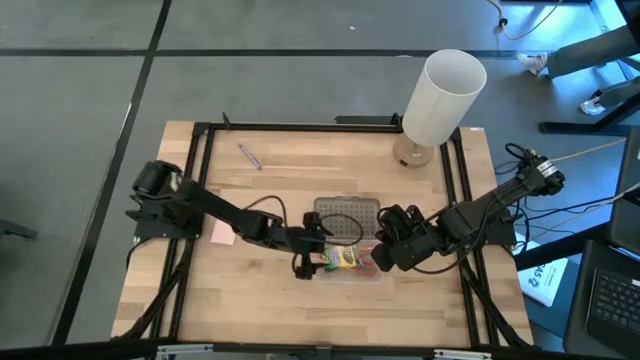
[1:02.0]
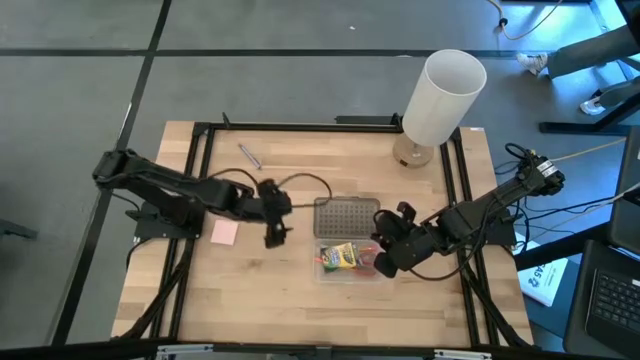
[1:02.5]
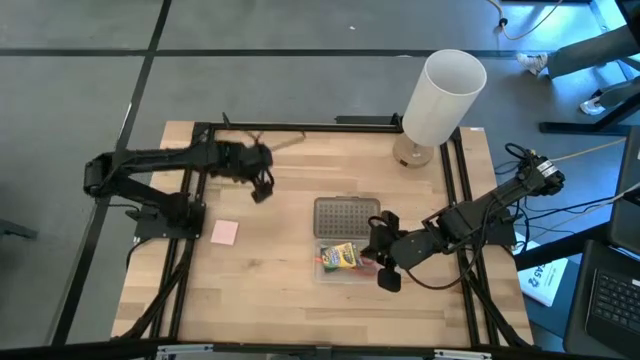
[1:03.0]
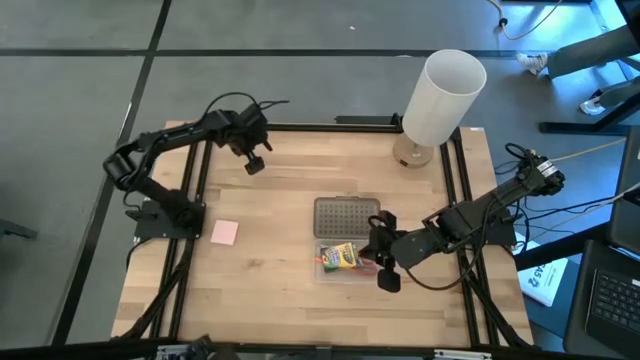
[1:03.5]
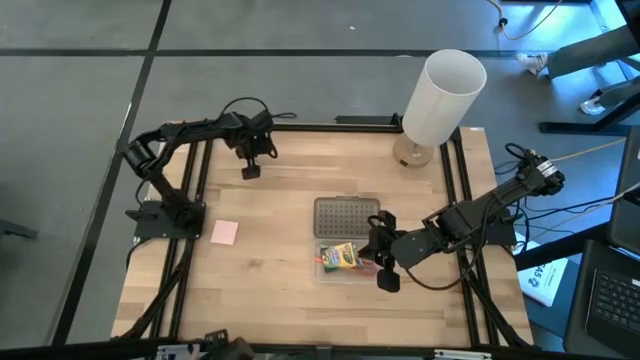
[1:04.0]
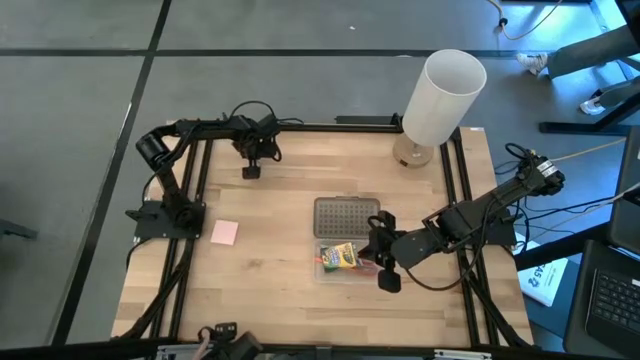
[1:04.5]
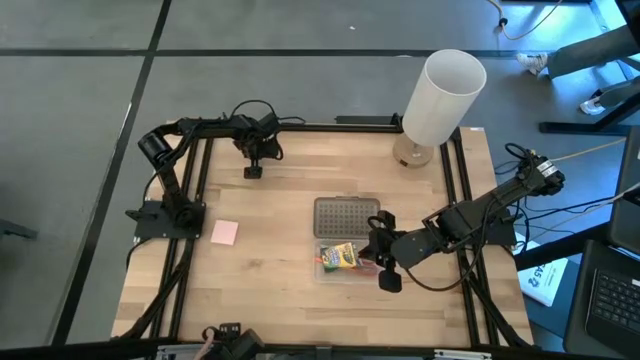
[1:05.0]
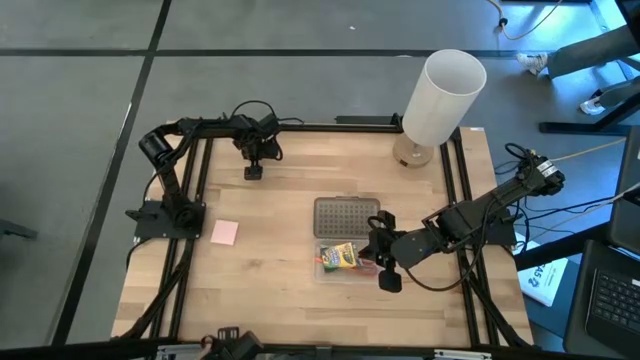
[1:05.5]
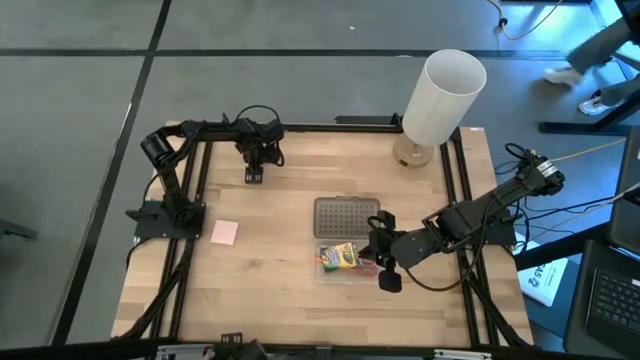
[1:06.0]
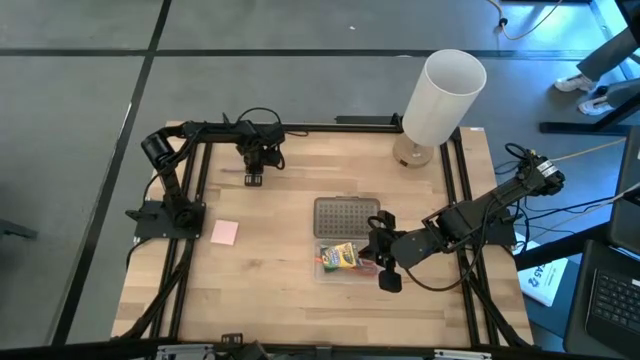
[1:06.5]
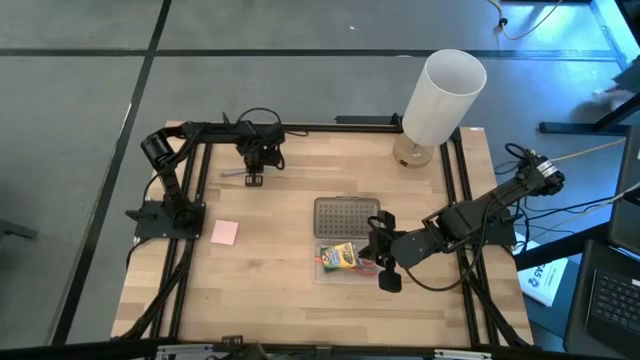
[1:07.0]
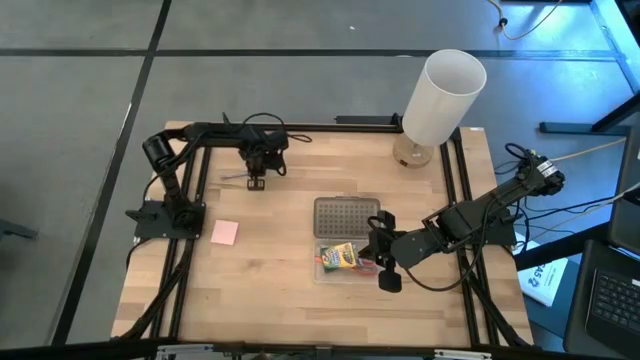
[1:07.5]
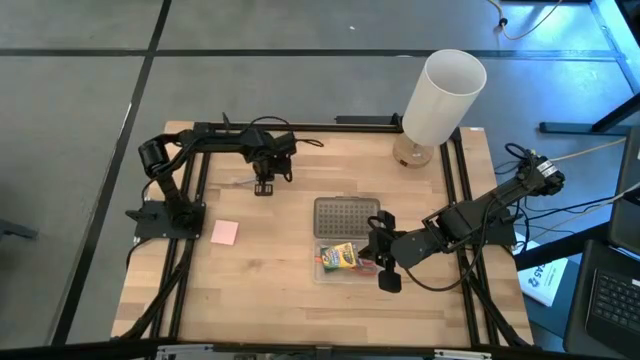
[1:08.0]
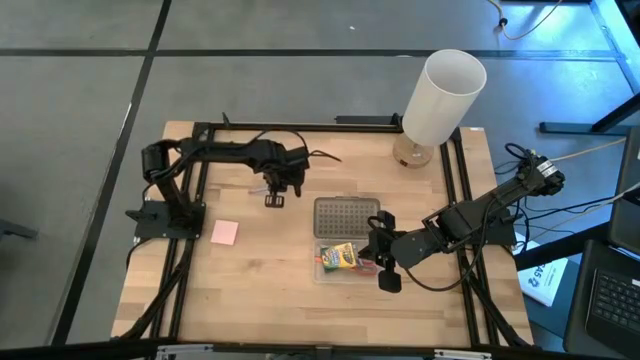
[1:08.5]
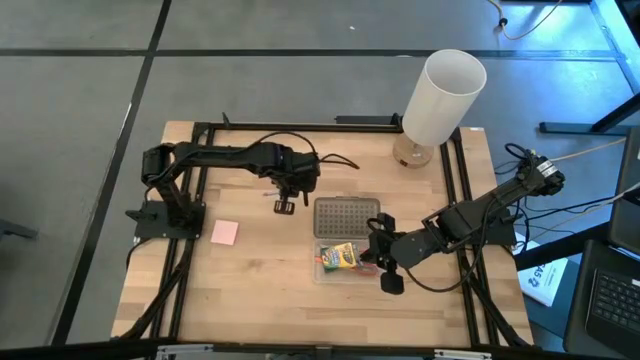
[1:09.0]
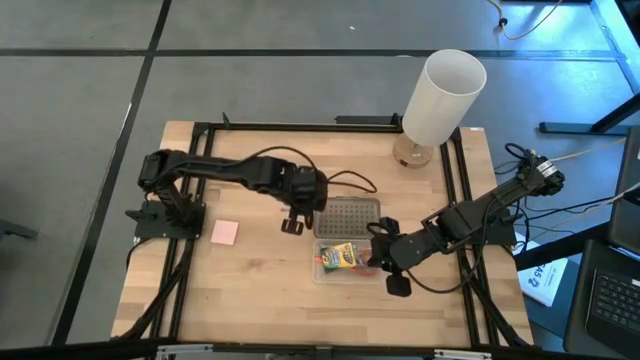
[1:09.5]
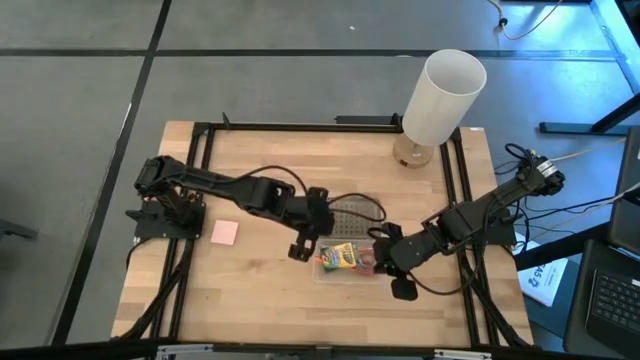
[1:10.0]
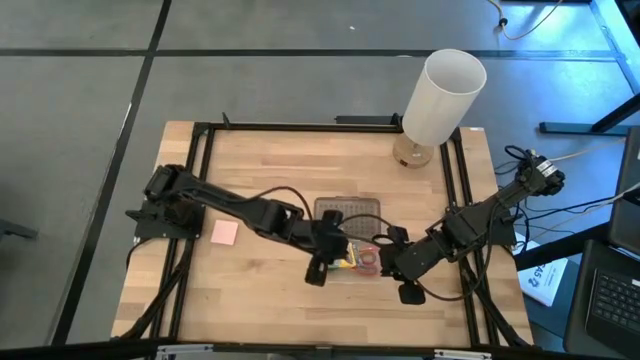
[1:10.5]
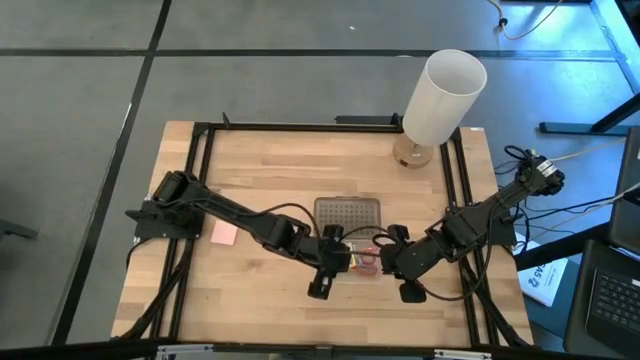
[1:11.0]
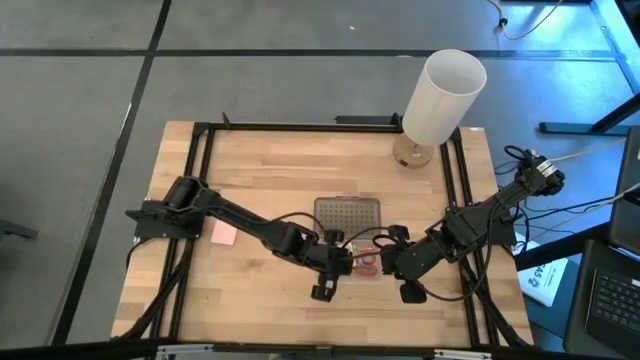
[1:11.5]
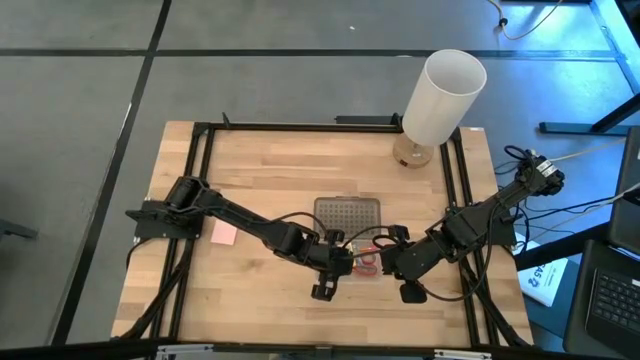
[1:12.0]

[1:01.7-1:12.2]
Task: Pack school essentials
Put the gray pen into the supply box

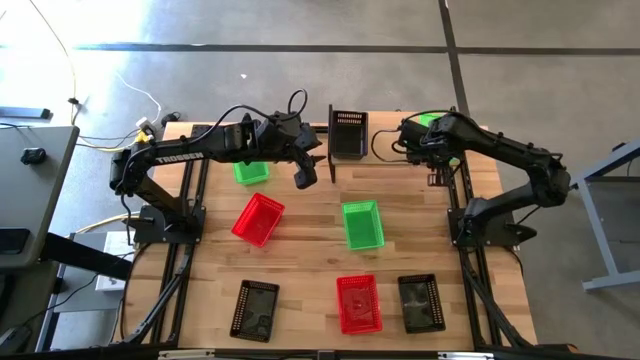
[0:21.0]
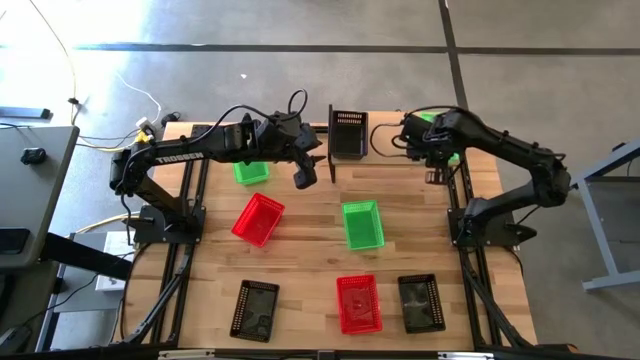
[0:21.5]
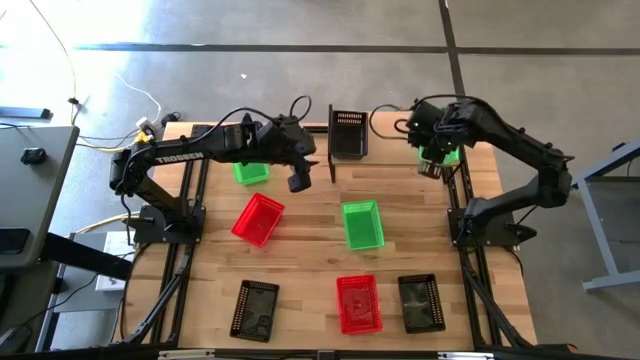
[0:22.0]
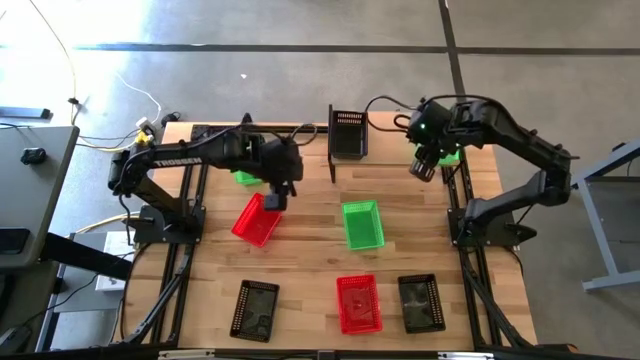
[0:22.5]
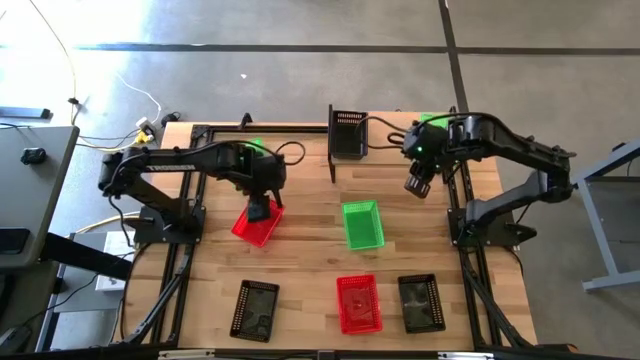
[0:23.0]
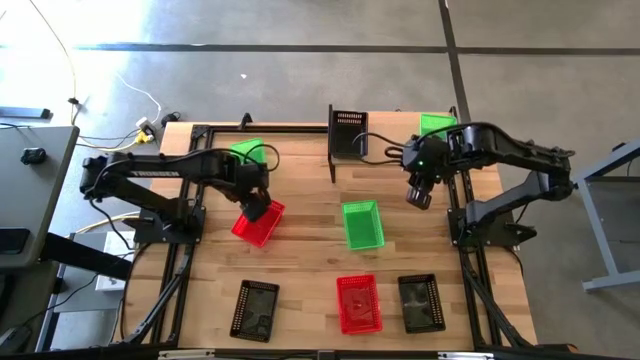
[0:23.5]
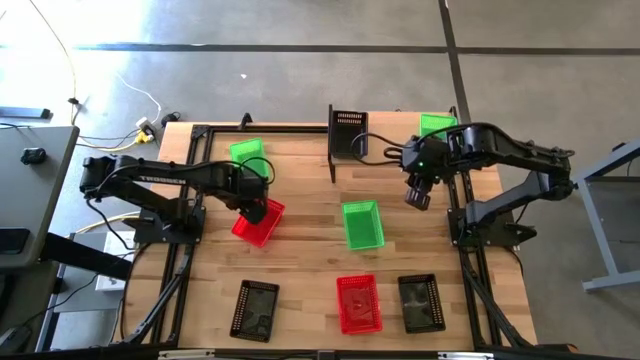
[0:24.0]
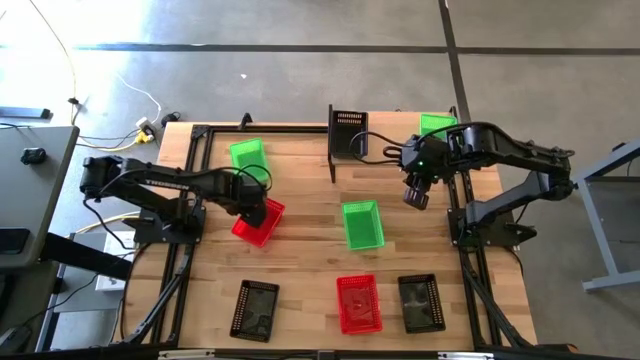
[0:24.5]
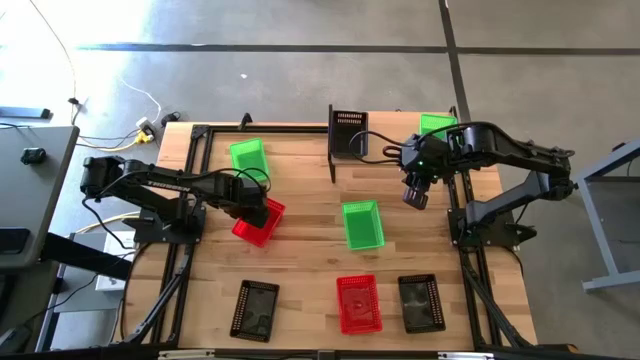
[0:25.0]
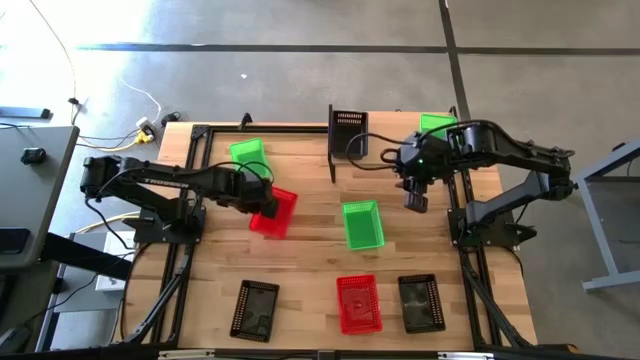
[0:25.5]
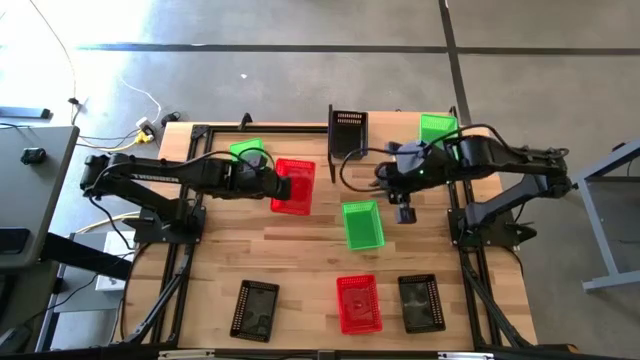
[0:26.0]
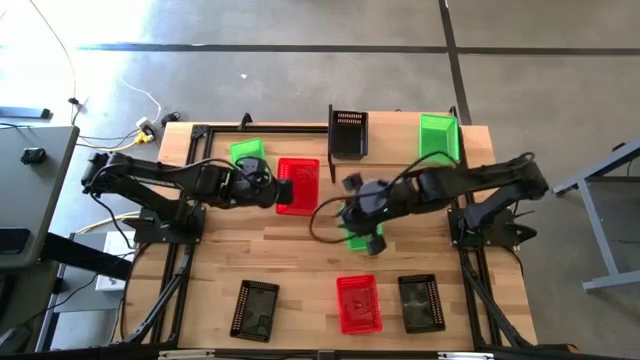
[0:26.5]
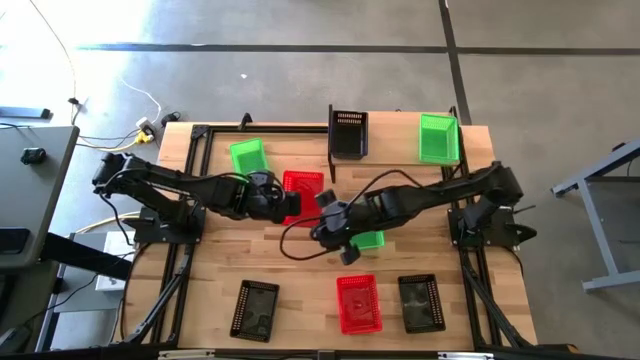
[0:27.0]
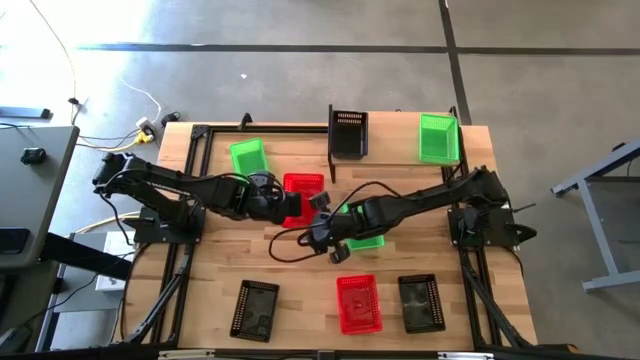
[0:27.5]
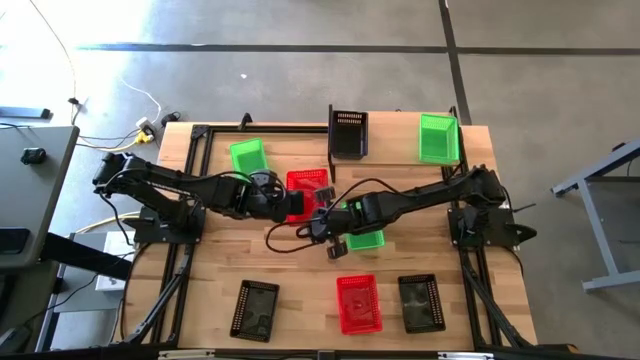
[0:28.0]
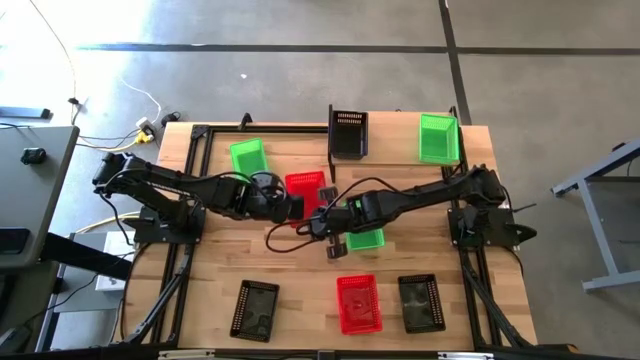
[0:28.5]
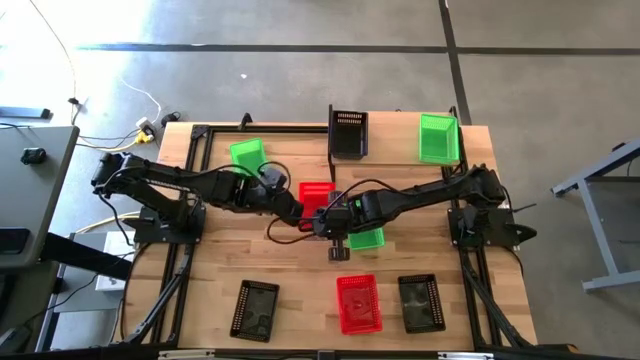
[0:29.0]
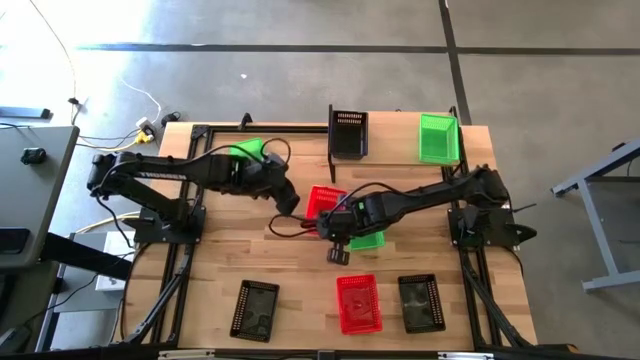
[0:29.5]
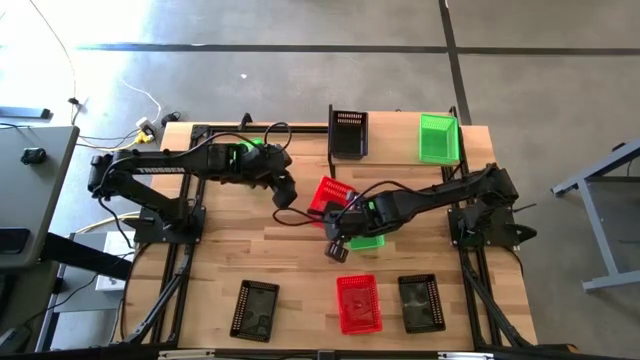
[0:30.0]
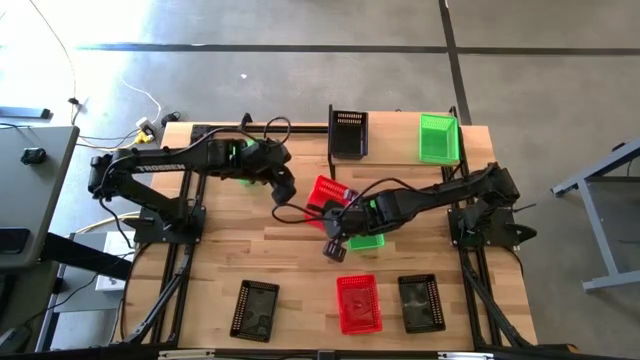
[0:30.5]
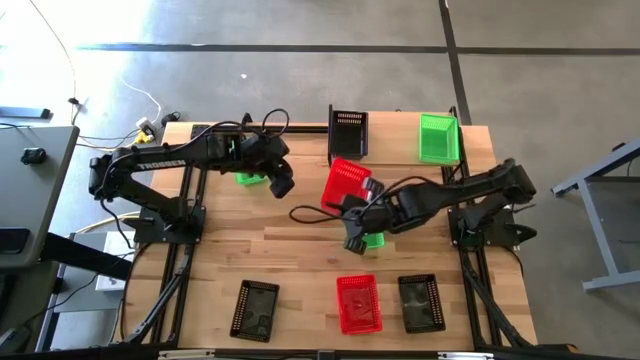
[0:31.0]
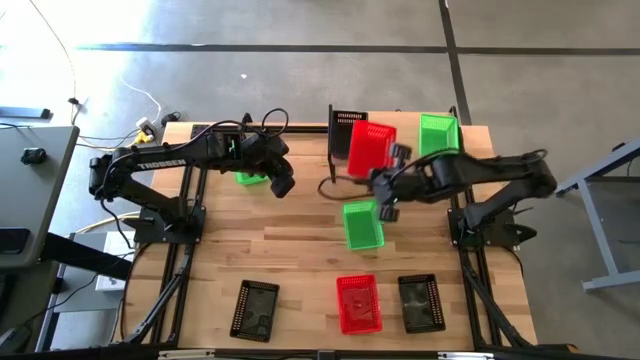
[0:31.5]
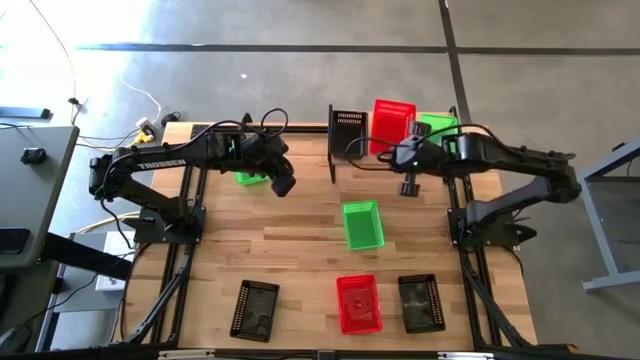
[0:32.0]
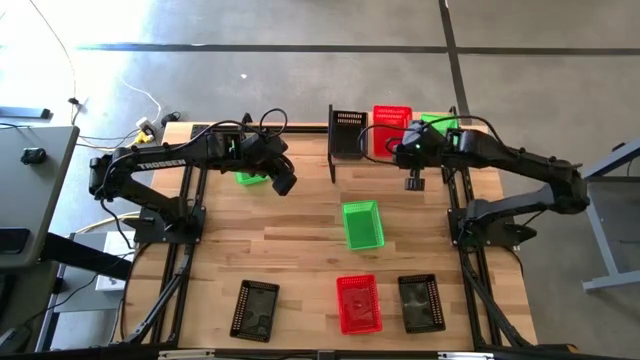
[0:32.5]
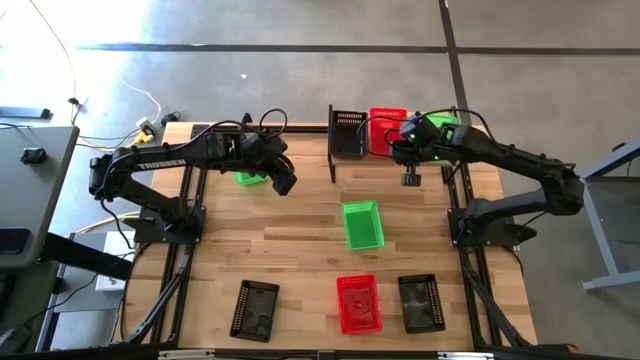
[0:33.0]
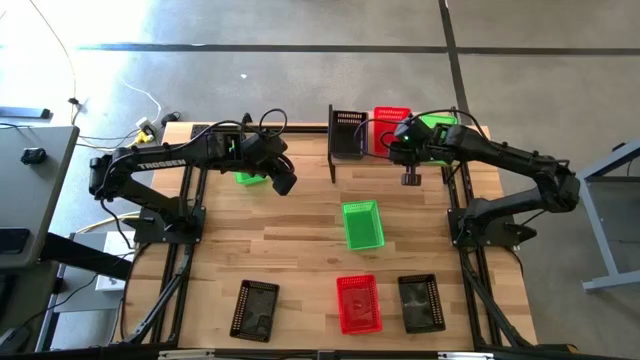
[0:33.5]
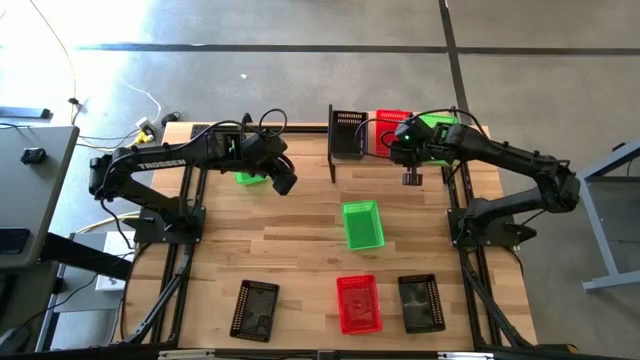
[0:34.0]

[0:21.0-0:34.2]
Task: Stack baskets on shelf by color
Put the left red bin on the shelf
